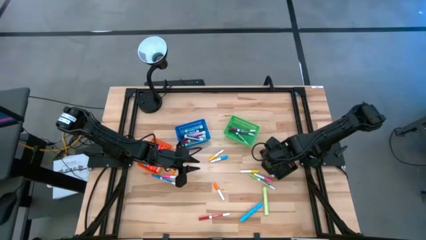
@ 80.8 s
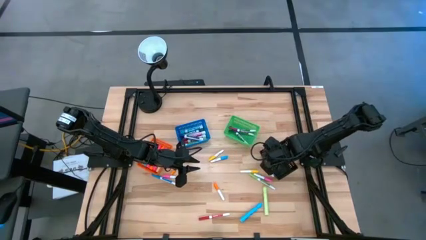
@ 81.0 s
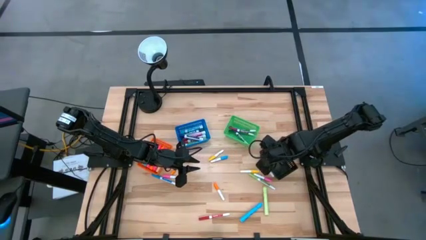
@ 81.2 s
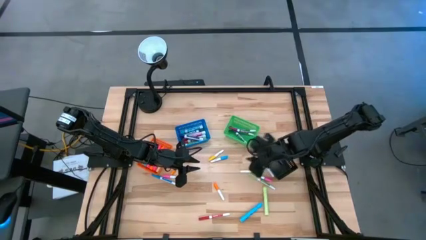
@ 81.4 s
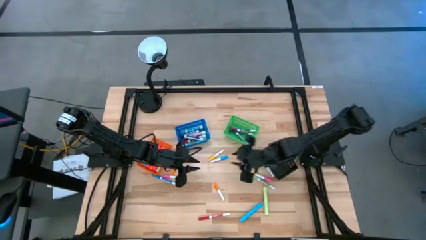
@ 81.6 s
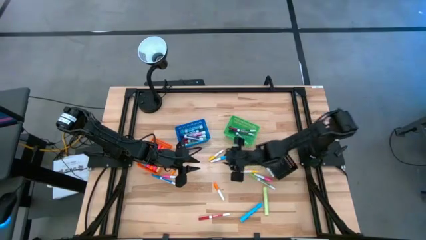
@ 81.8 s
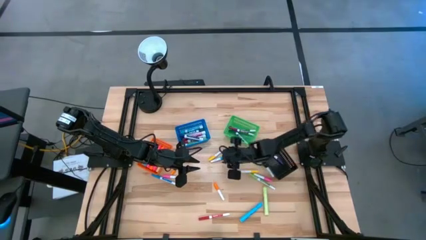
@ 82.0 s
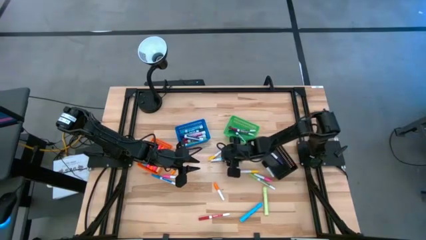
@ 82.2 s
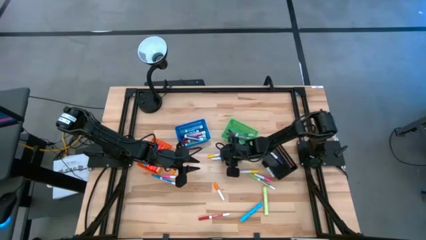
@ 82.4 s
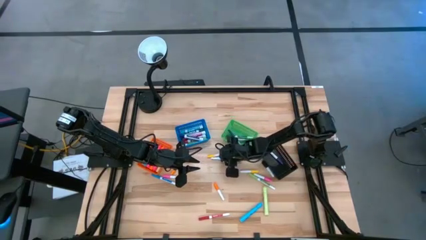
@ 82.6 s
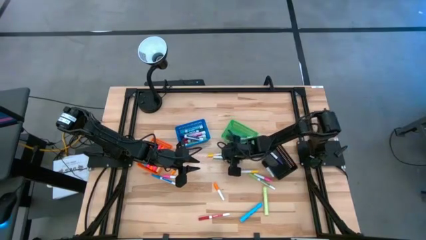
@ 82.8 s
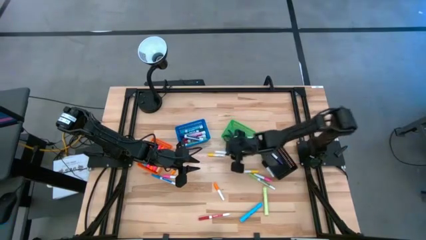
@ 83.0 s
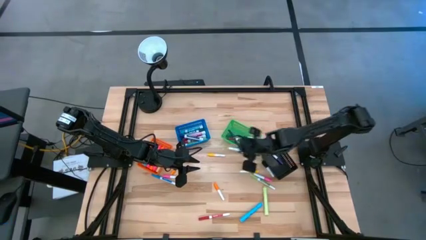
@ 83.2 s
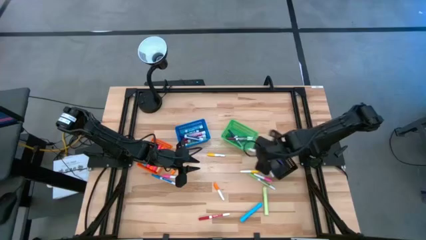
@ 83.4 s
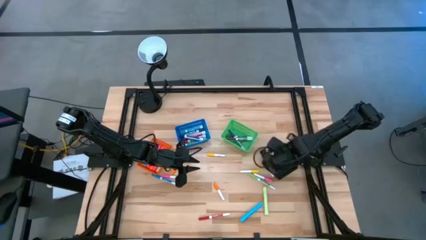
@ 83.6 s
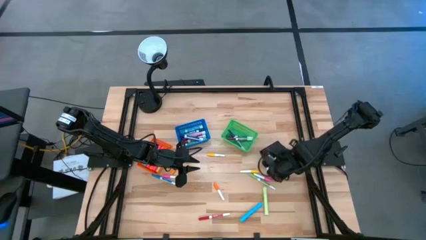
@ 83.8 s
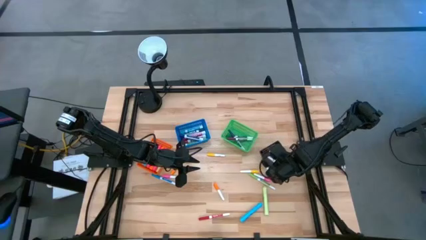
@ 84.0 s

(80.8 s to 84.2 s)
Task: Pick & Place Markers
Put the small light blue highlighter pen into the black basket

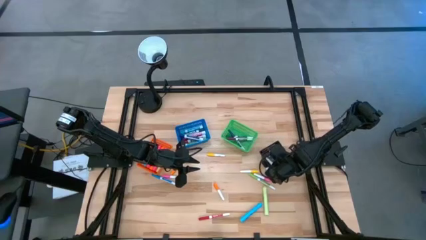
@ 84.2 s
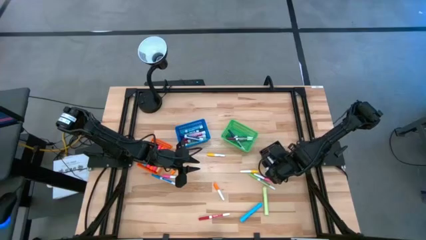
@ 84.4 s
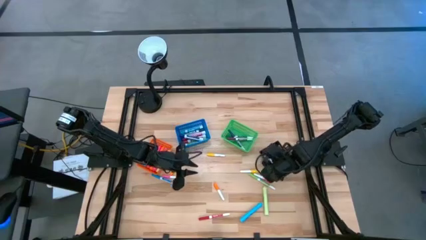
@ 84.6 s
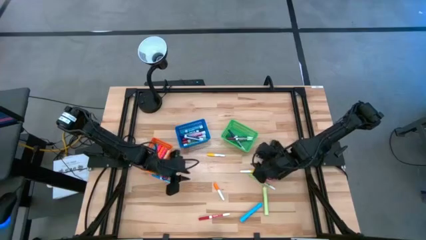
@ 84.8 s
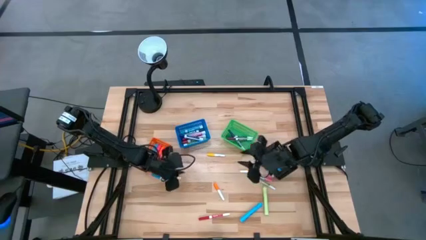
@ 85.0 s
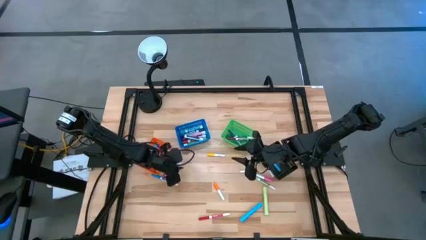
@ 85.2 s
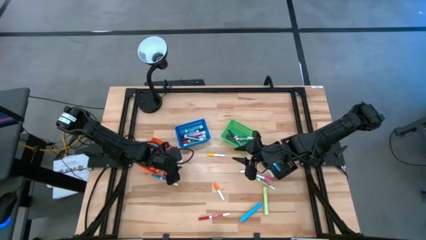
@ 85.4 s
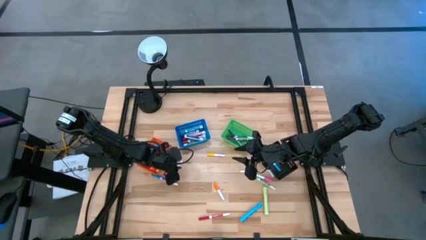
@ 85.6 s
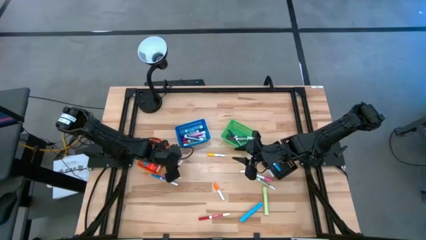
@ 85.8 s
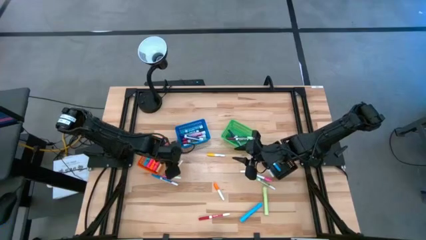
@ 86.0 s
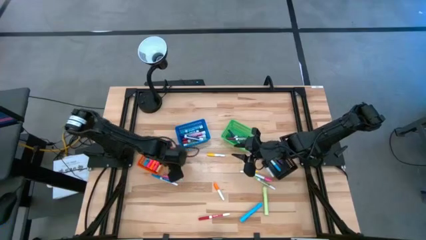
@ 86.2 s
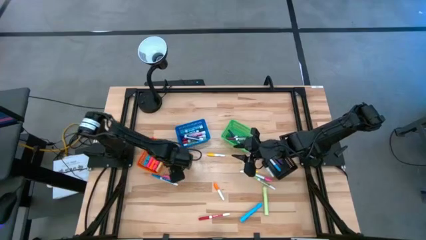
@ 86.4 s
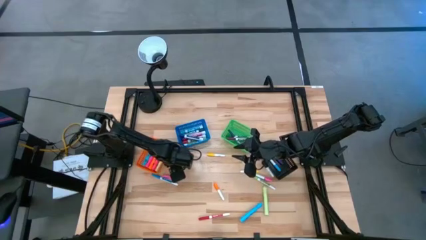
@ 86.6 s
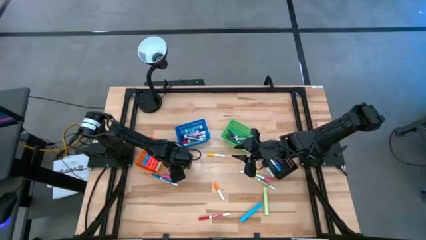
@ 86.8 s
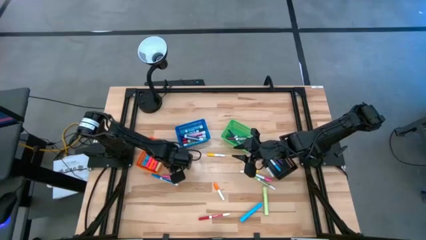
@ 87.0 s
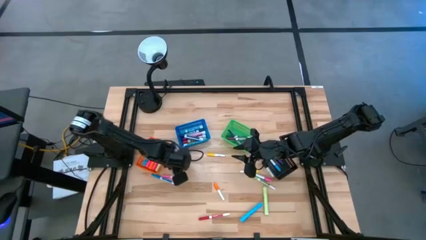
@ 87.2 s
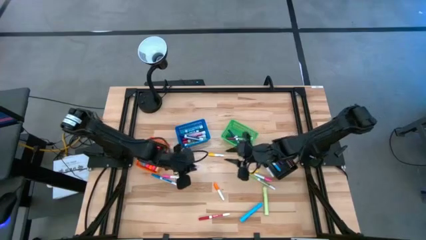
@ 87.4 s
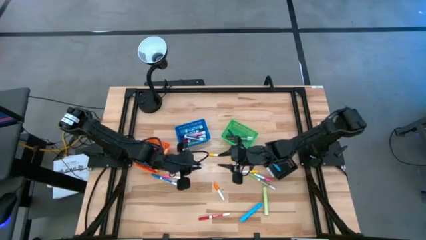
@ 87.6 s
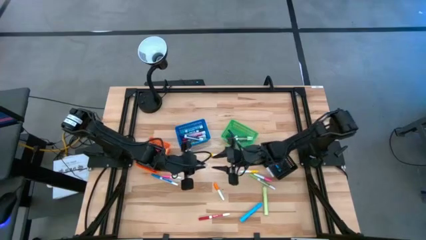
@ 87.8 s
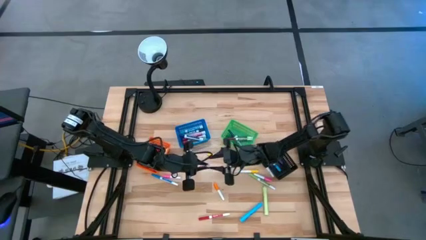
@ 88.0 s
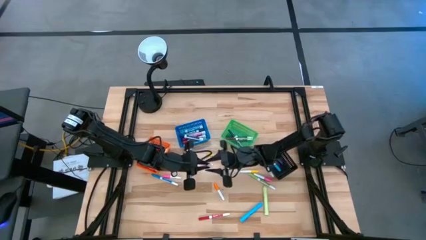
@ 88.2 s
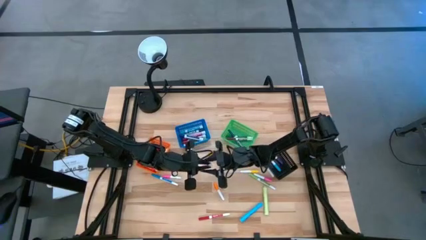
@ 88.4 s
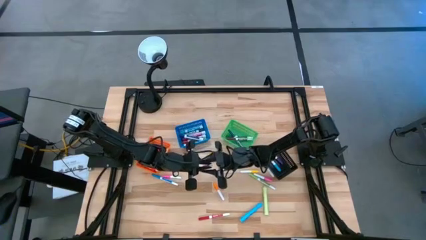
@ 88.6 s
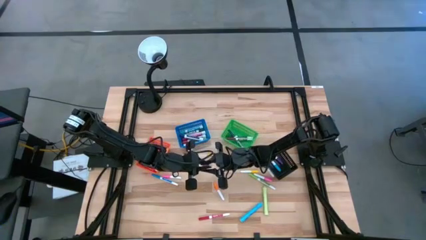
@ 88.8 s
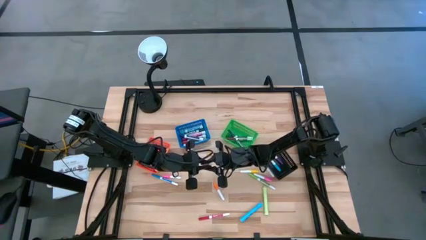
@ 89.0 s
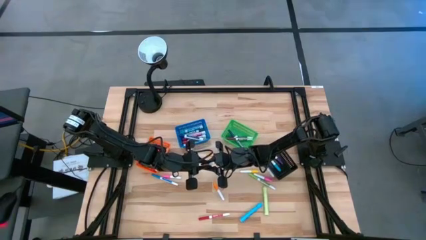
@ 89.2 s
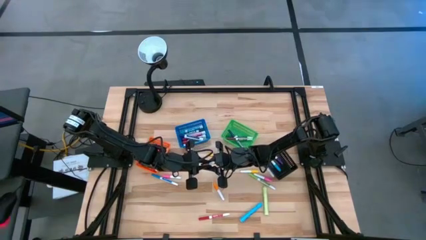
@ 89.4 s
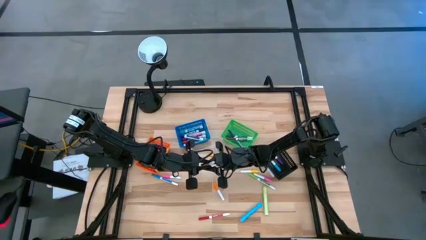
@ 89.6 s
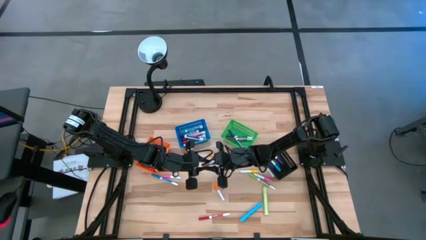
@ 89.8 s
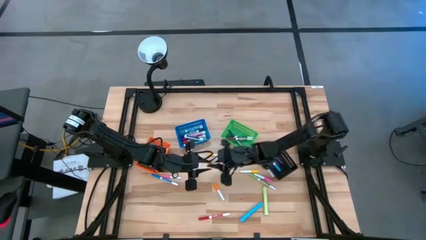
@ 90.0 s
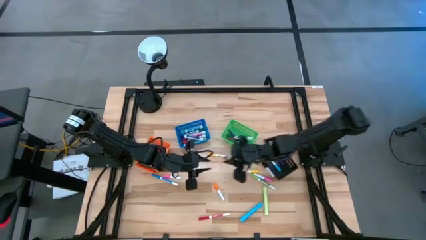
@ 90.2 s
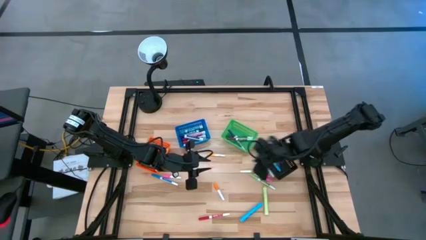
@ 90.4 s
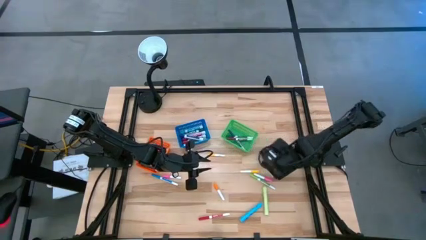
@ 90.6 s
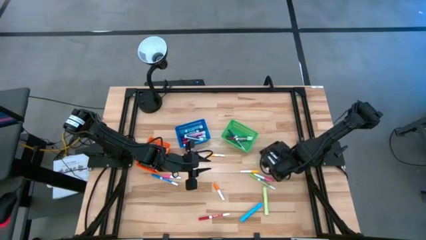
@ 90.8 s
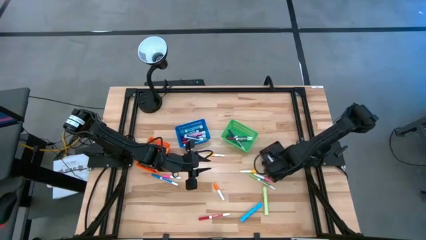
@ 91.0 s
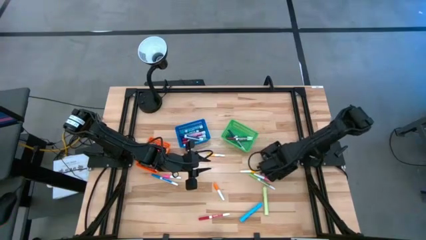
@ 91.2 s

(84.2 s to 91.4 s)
Put the small left orange highlighter pen into the black basket

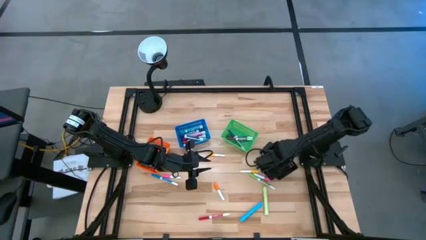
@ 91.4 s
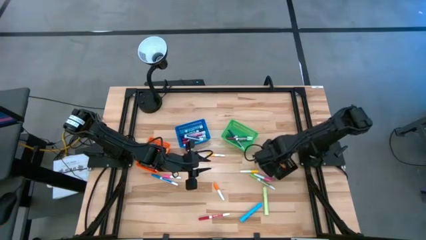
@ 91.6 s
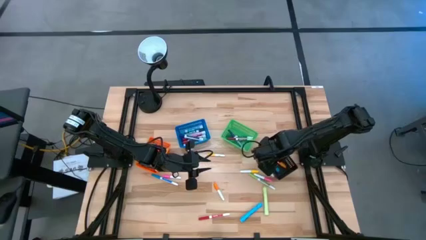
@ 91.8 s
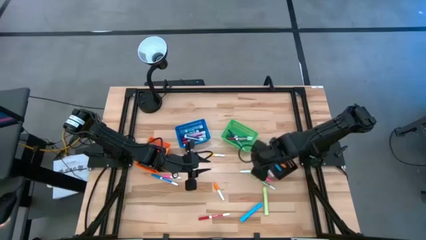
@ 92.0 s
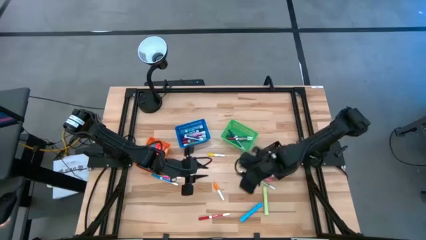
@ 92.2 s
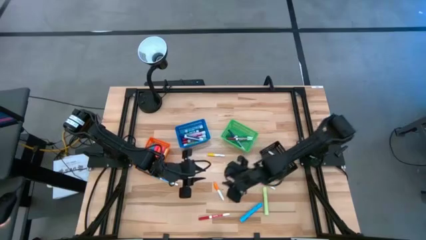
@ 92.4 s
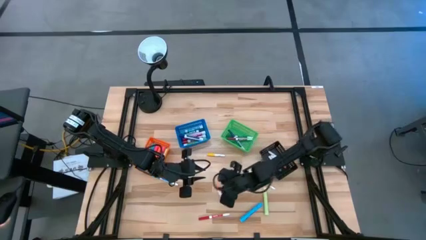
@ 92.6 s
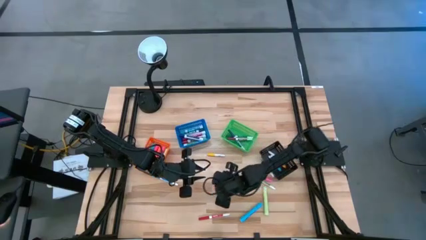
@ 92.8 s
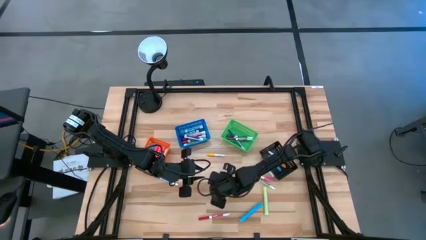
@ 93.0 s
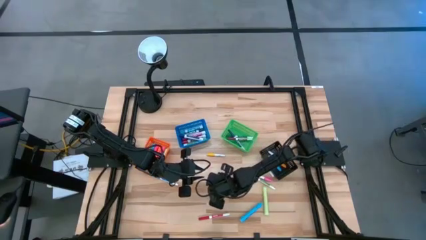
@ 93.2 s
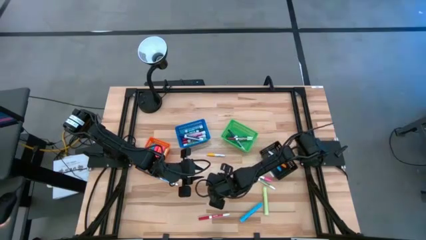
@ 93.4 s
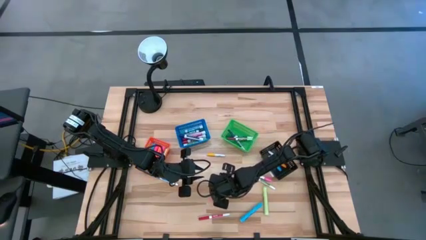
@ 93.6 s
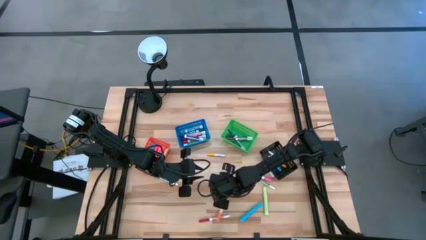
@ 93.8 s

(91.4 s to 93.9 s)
Put the small orange highlighter pen into the black basket

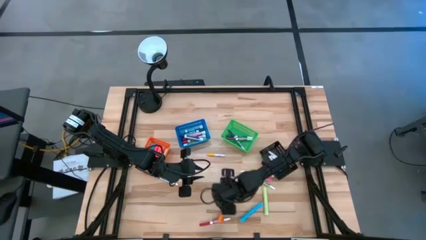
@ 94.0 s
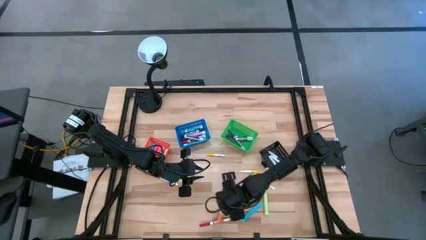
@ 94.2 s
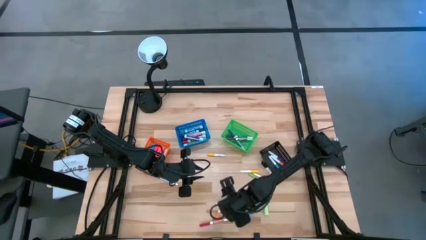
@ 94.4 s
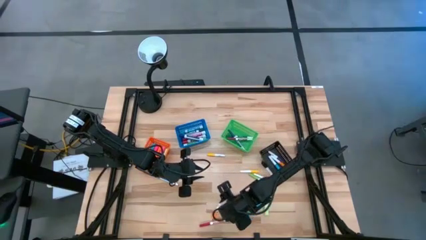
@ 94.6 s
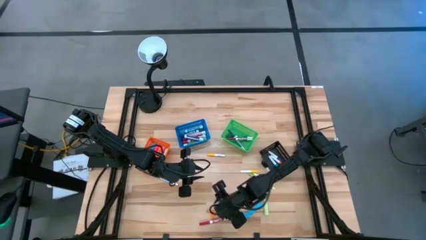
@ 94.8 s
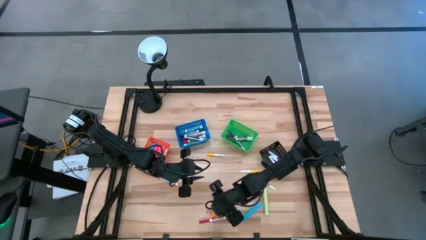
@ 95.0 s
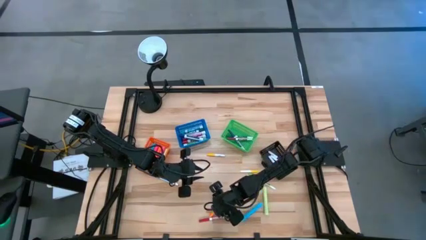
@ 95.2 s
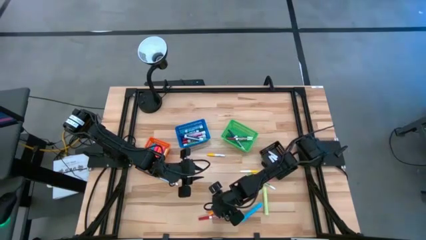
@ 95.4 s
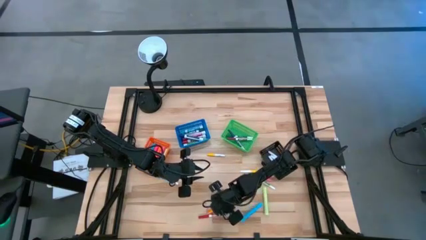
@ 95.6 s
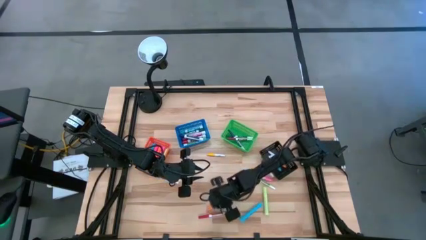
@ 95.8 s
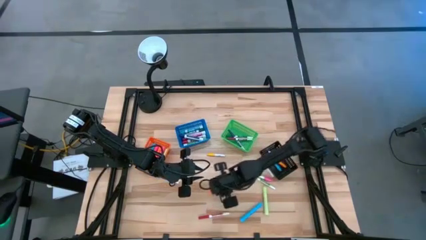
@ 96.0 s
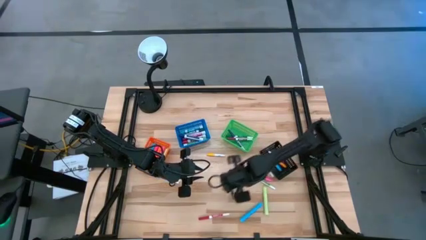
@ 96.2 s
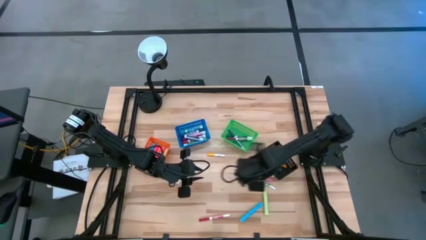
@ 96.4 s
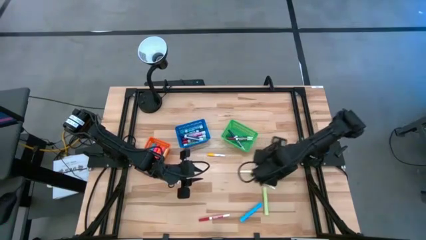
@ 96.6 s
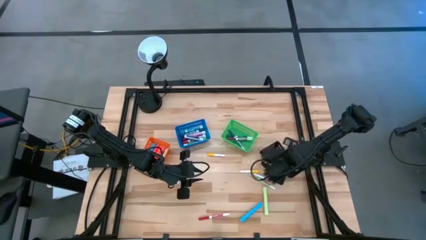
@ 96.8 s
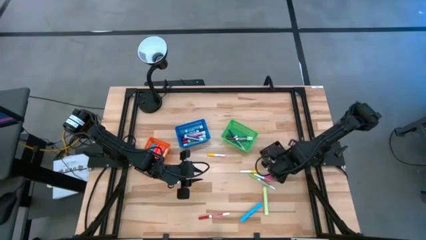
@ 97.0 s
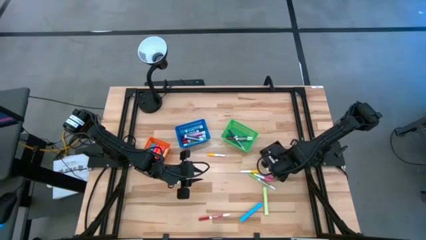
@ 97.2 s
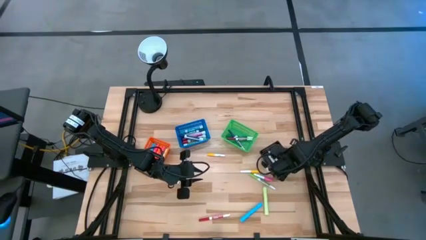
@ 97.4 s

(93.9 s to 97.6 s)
Put the small orange highlighter pen into the black basket
